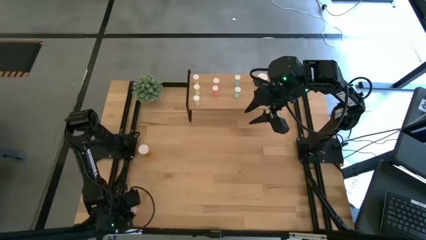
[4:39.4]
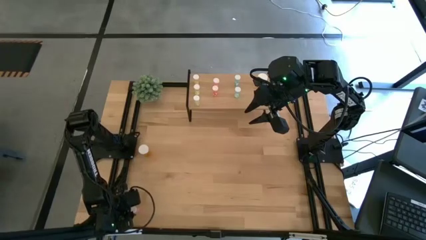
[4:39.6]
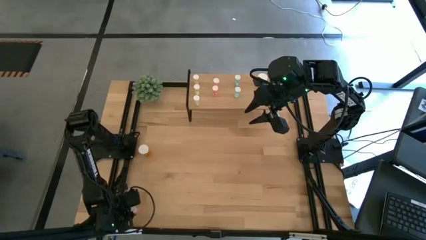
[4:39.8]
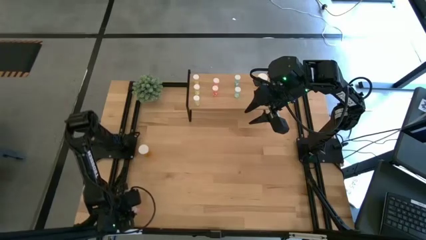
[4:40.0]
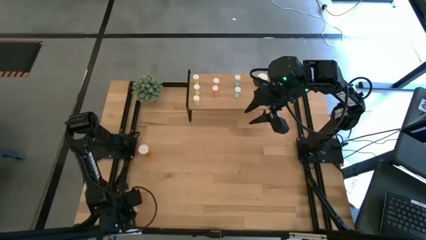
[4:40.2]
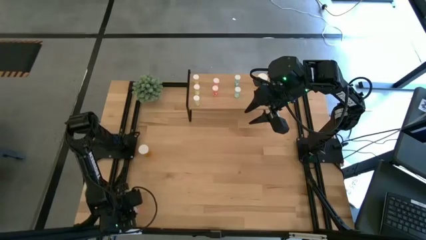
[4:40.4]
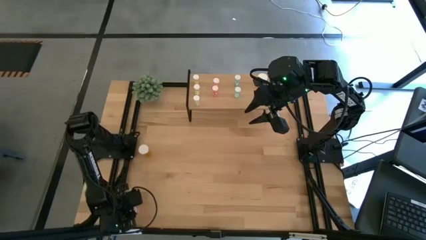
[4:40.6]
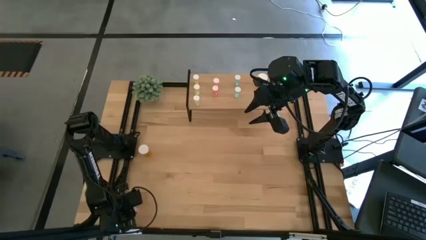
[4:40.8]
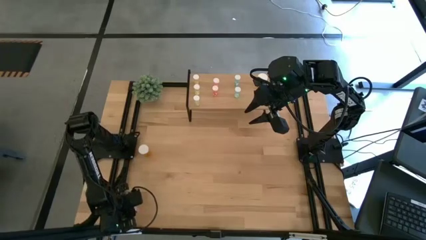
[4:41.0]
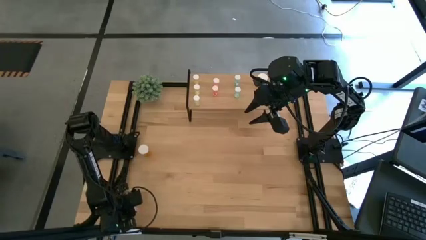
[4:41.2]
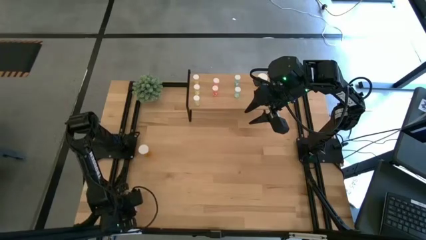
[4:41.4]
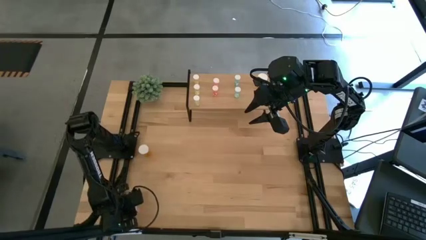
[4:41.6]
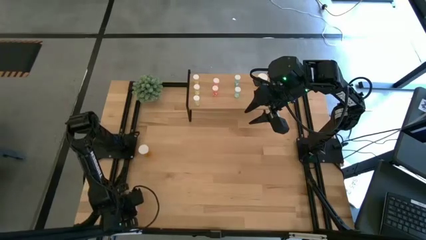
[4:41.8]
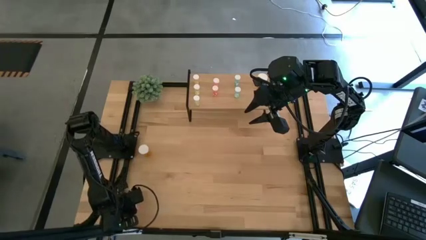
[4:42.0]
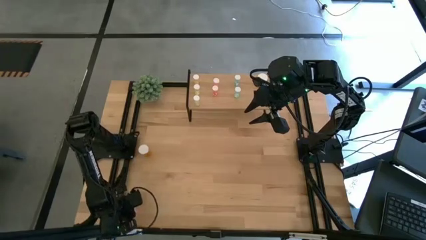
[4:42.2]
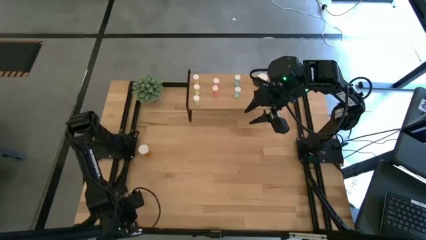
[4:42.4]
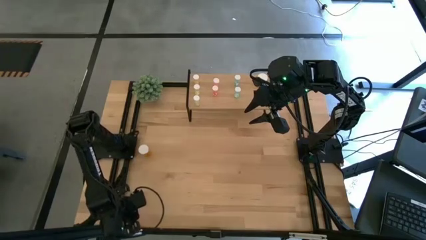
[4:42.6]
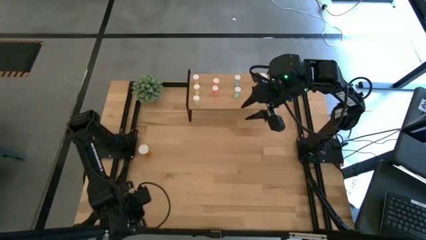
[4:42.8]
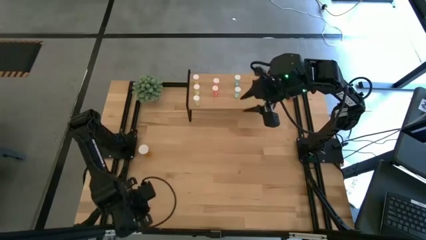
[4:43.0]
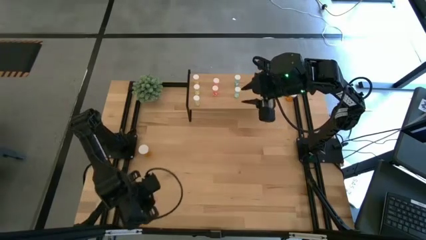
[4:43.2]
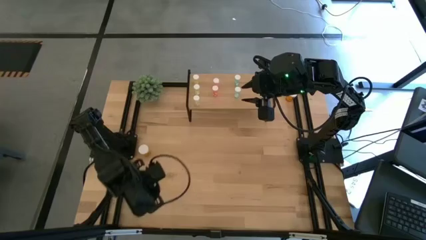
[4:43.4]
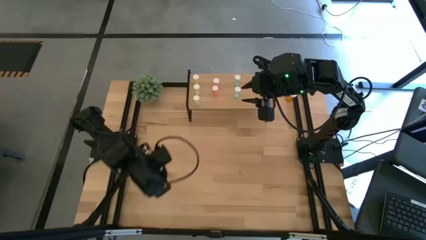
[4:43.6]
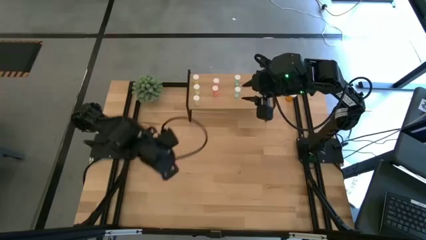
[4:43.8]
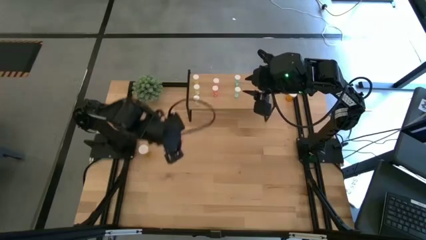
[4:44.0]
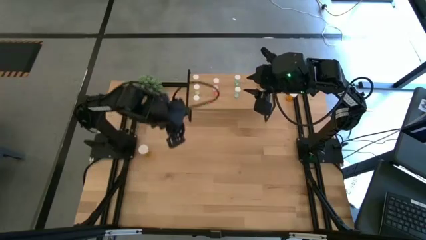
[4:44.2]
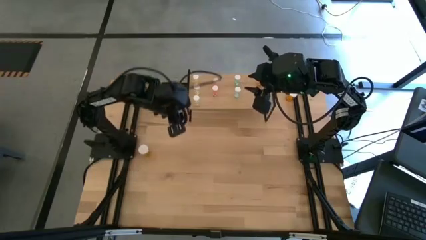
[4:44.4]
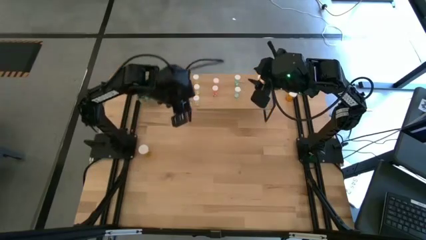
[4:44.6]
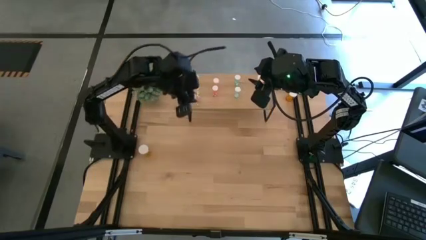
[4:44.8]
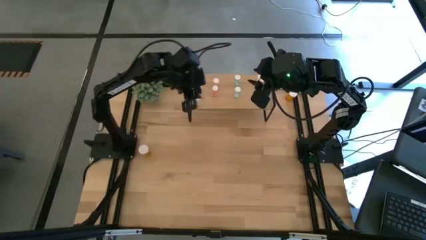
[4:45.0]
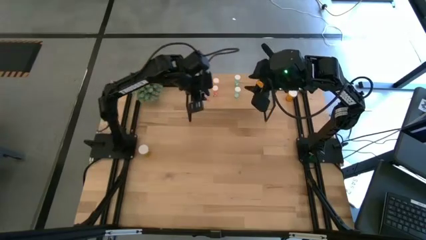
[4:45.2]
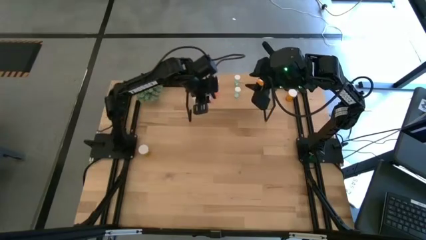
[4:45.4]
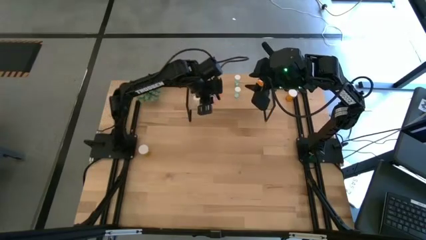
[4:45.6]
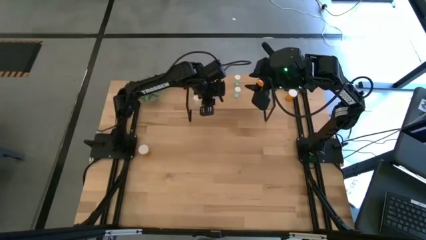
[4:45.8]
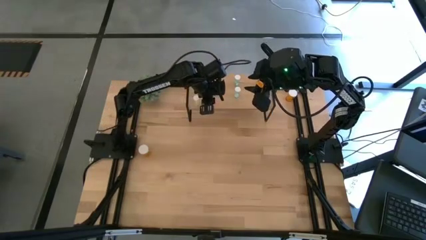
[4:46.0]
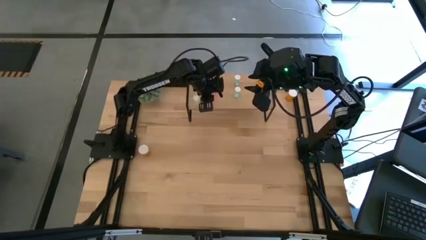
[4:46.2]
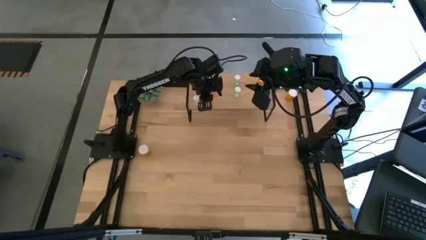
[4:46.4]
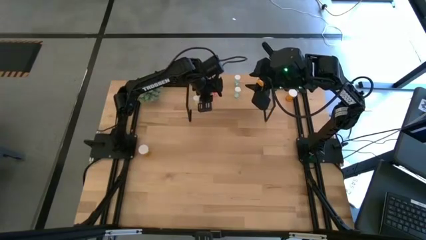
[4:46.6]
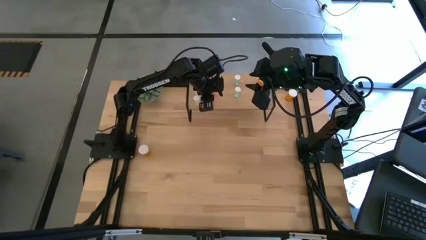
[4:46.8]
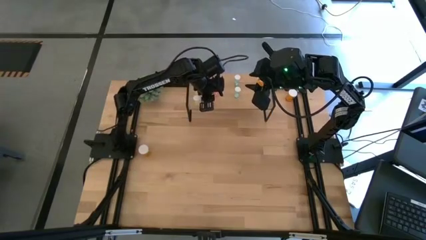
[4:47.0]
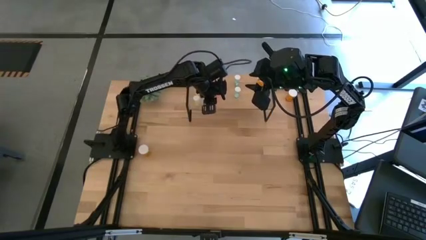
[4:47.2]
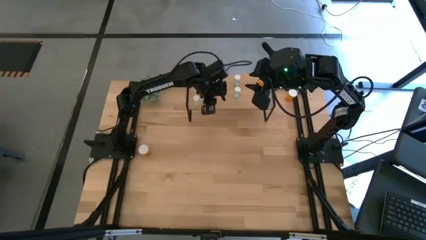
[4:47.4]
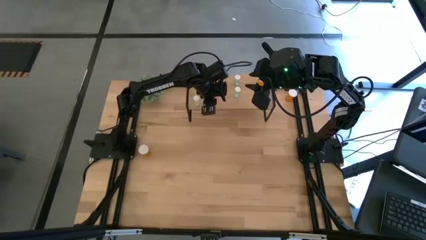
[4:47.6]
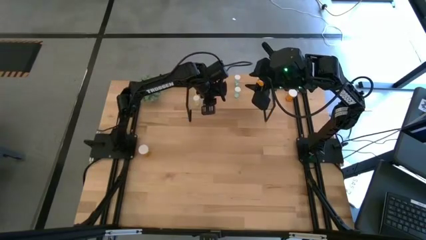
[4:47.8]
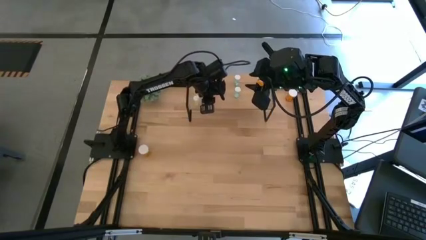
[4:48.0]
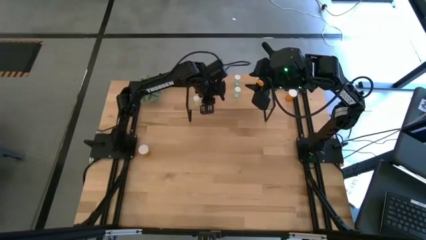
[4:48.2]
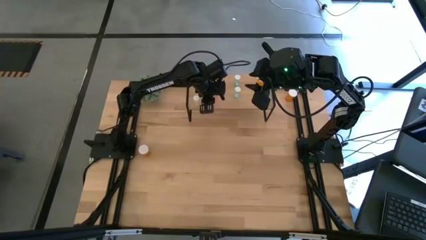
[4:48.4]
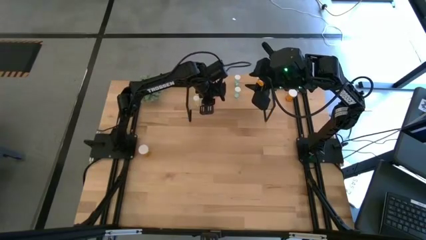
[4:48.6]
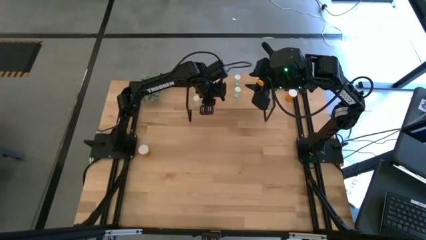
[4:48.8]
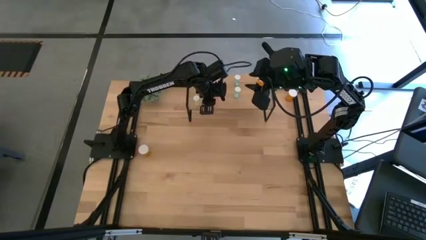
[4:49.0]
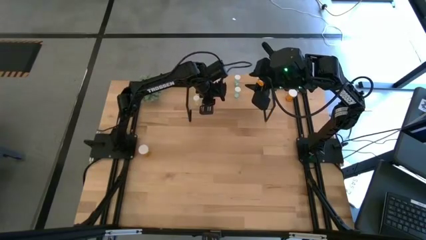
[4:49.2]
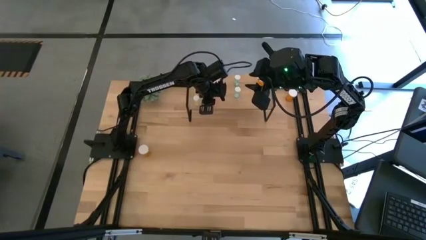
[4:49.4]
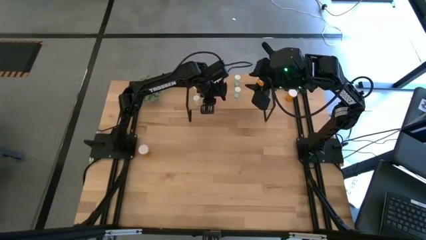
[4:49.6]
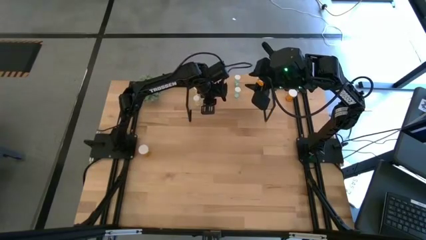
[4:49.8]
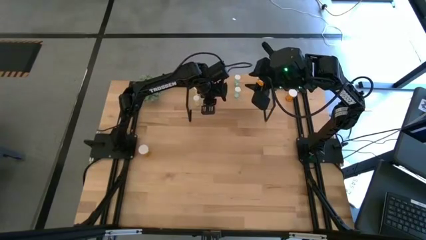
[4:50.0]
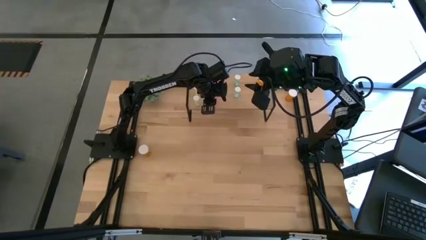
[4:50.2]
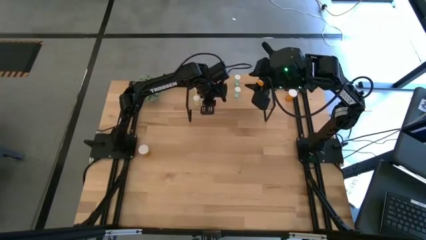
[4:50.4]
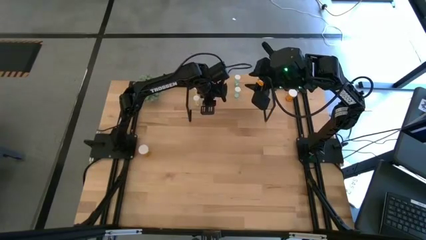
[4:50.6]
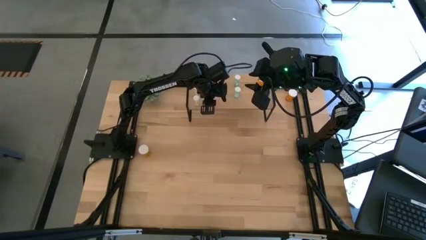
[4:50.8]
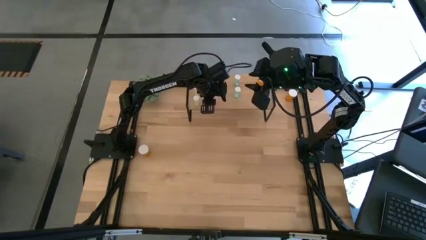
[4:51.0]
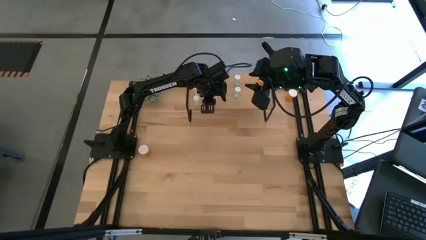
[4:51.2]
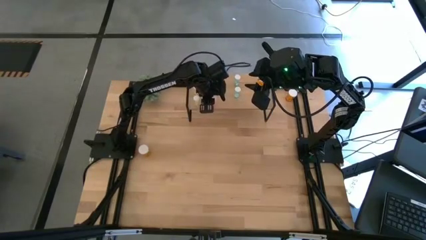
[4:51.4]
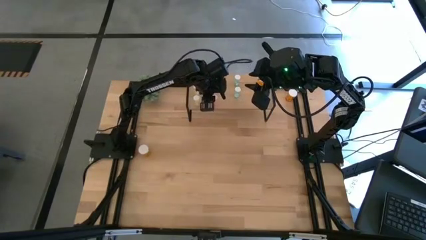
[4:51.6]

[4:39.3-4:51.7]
Task: Pick and place medicine bottles onto shelf by color
Put the pink pill bottle on the shelf aligned with the other pink pill bottles

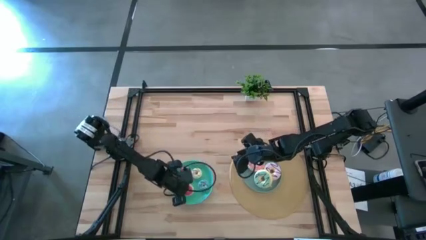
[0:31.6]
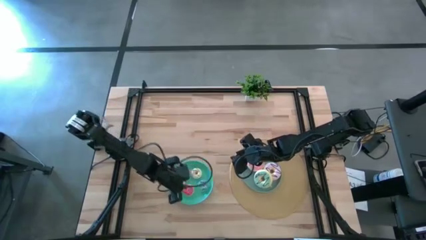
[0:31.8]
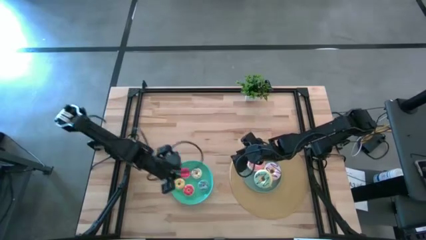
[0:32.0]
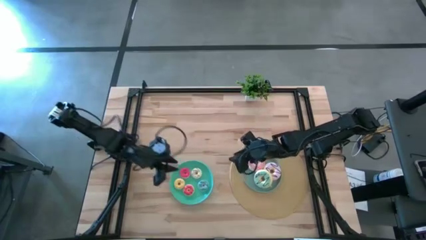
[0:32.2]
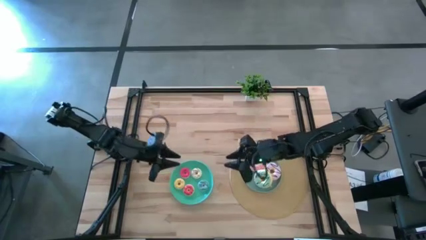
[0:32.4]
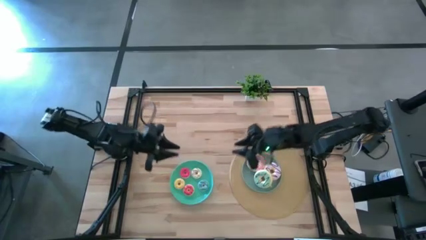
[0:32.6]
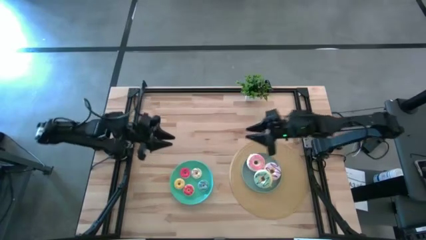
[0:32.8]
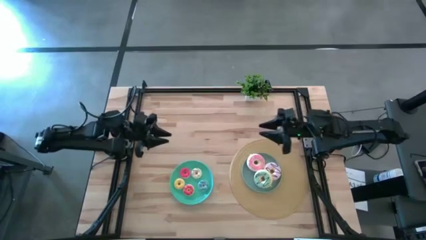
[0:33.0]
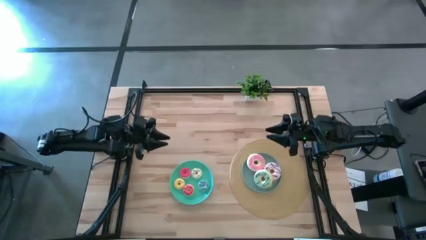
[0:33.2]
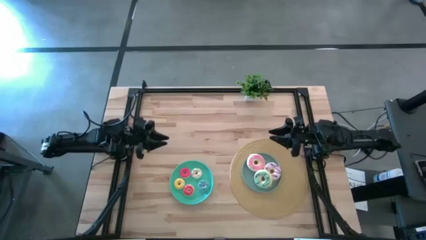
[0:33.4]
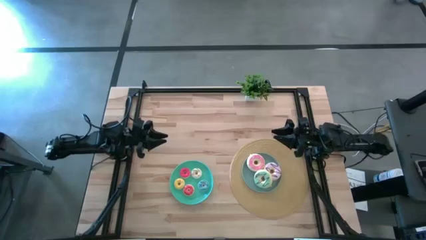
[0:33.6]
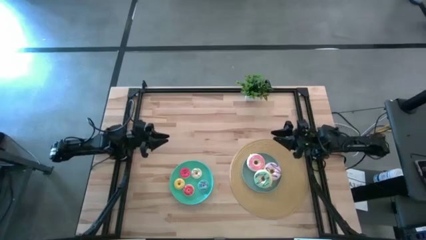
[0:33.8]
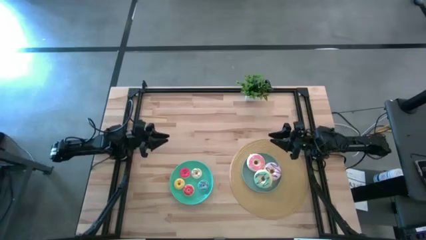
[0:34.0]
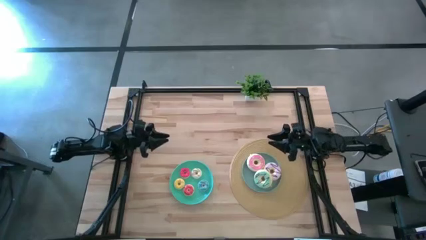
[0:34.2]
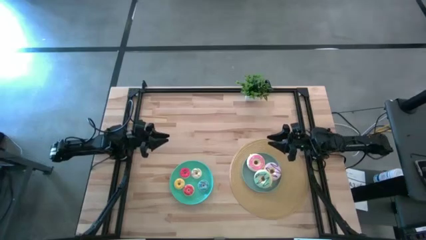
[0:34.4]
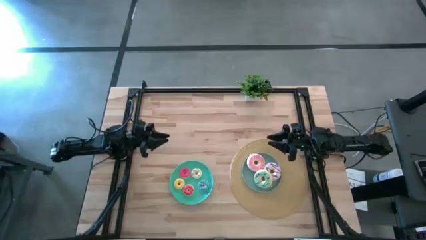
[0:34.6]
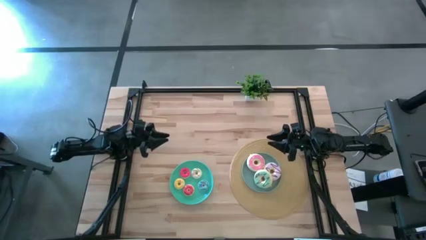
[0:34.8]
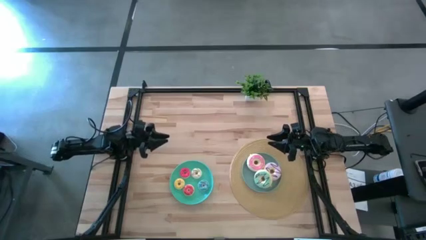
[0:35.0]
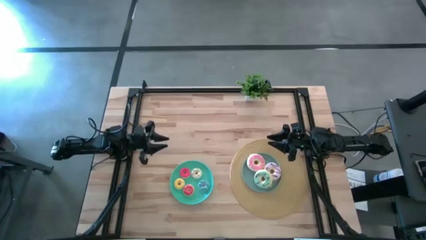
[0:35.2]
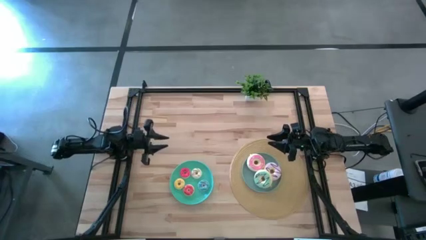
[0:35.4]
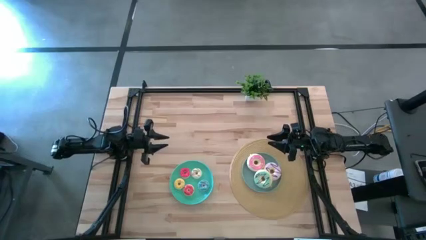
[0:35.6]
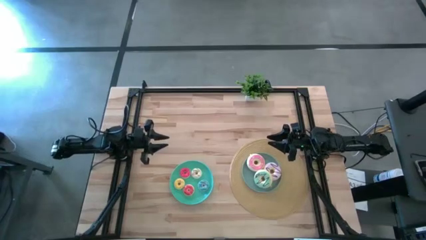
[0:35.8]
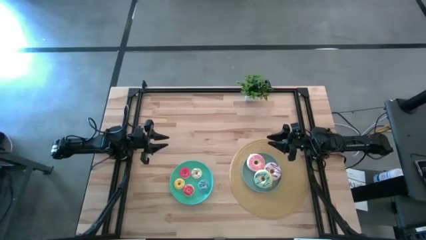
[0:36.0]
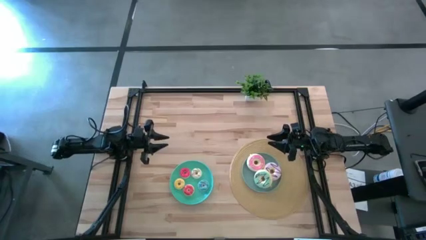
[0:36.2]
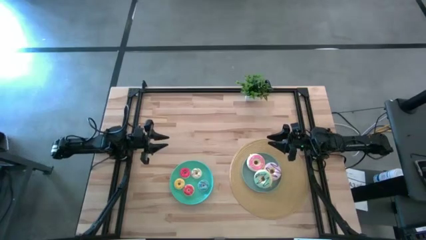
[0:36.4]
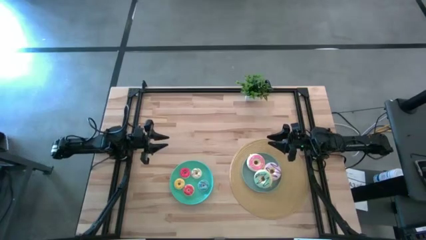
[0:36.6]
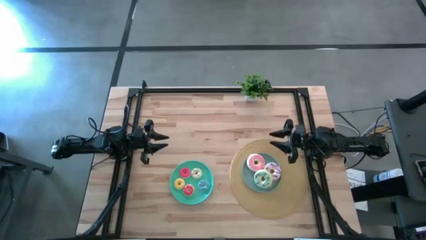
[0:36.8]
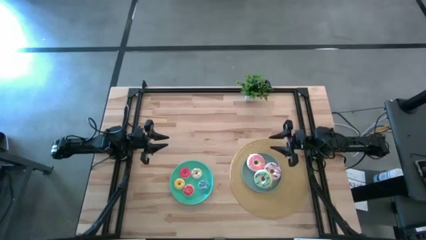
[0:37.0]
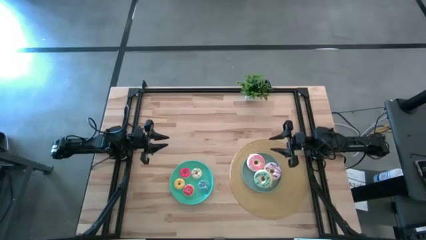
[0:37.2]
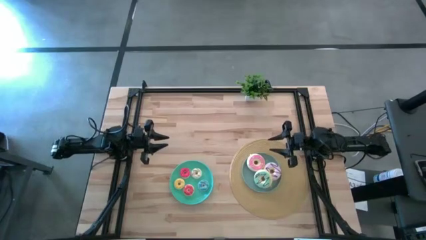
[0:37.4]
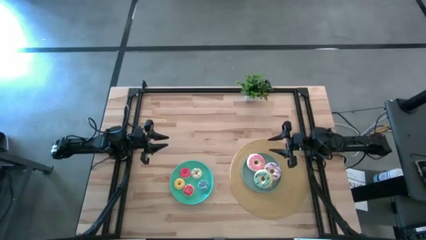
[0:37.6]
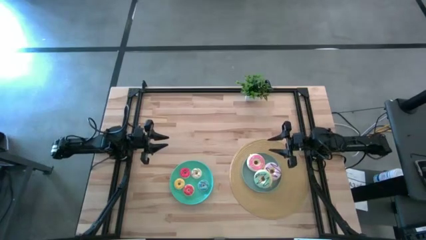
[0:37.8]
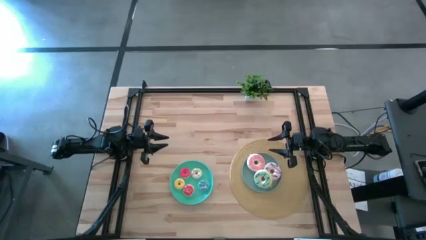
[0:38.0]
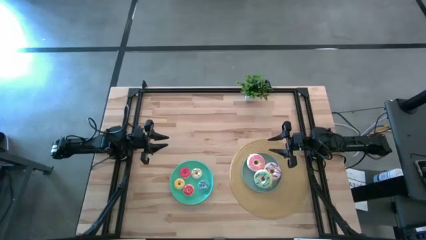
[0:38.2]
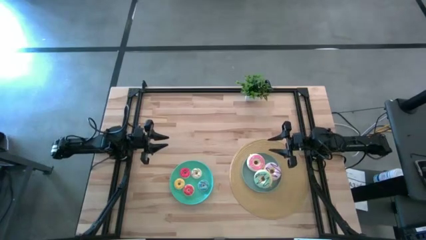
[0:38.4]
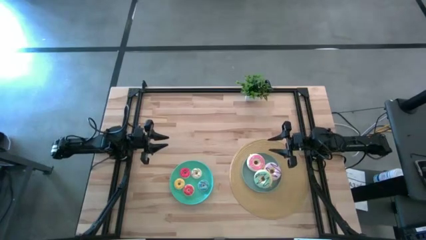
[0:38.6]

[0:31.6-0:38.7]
Task: Pick & Place donuts
Return to Home Position
